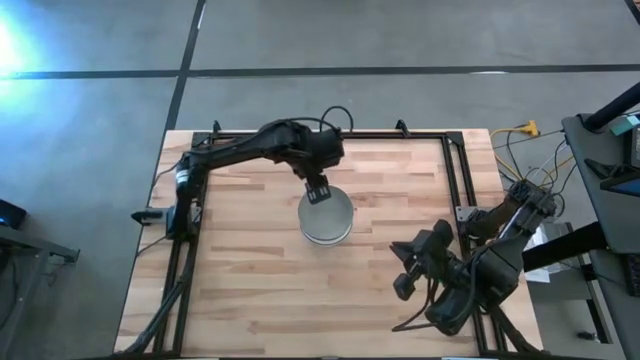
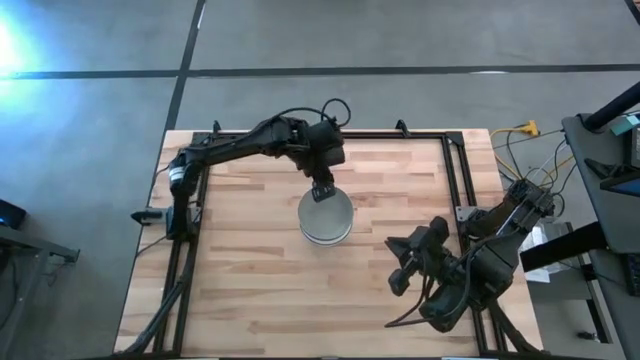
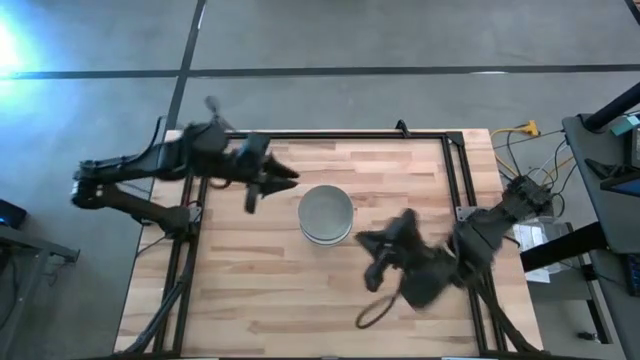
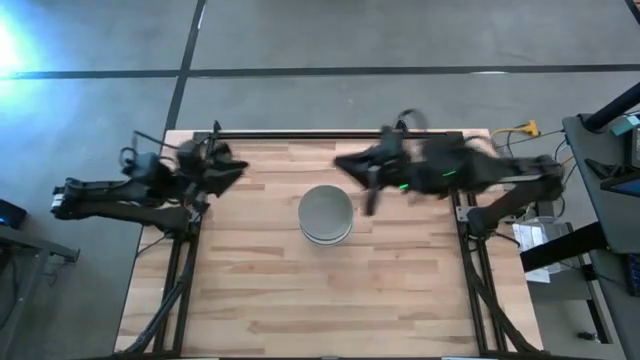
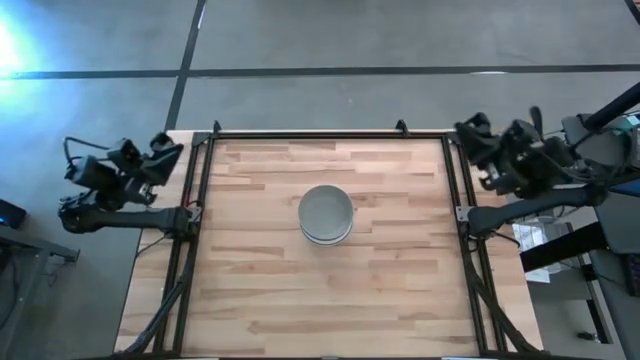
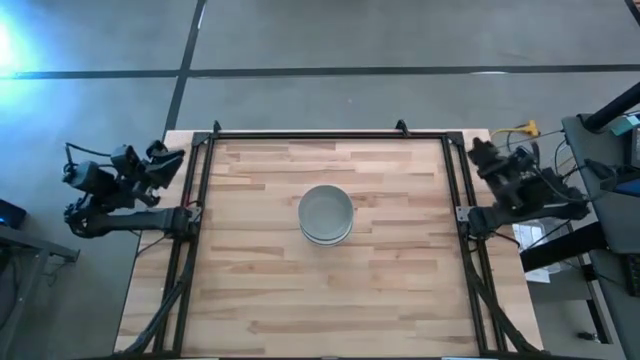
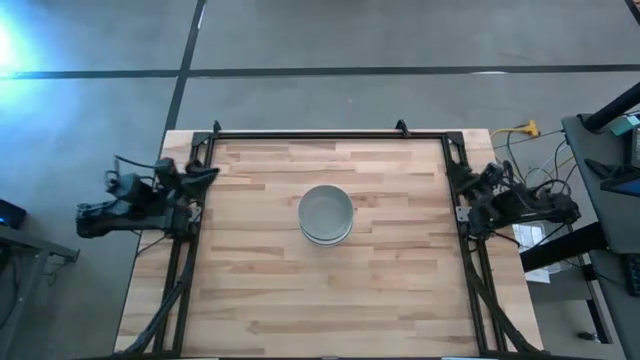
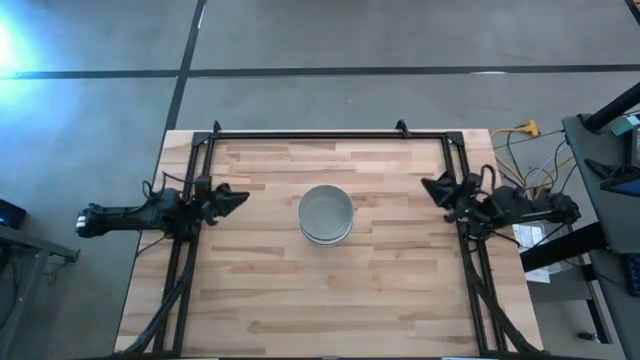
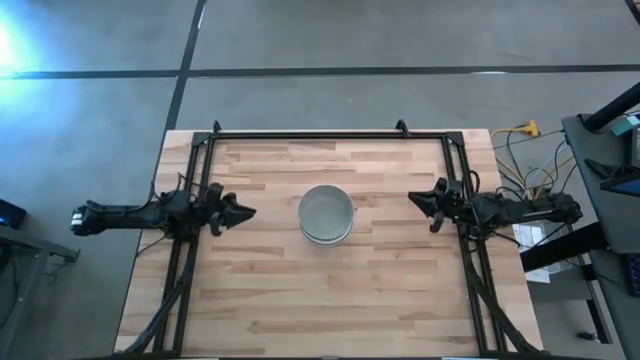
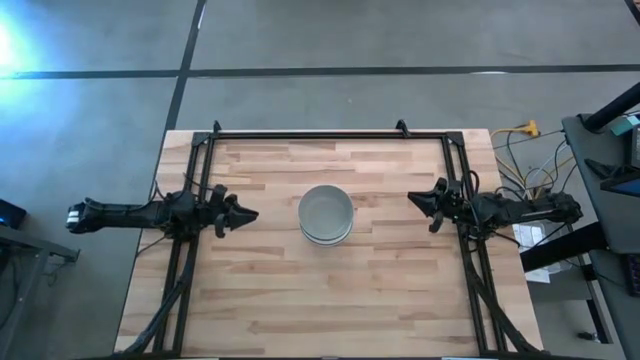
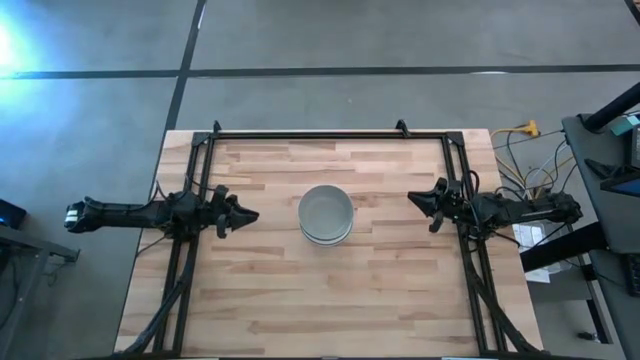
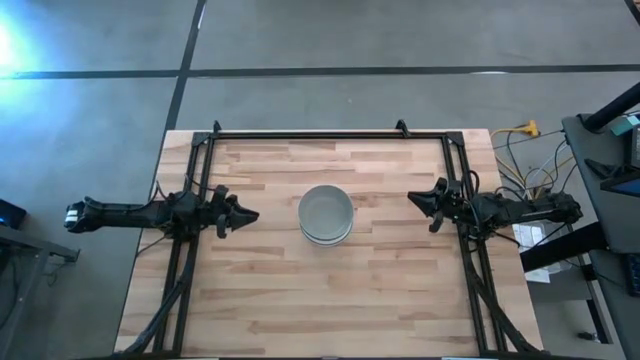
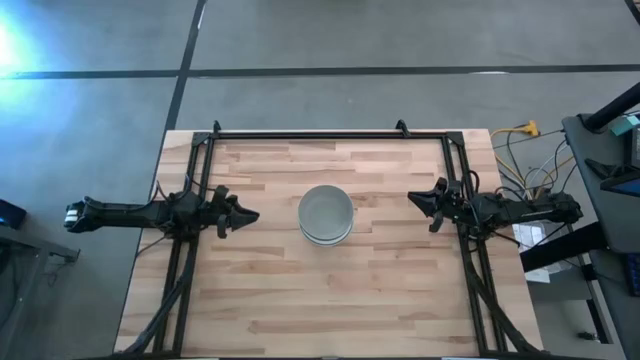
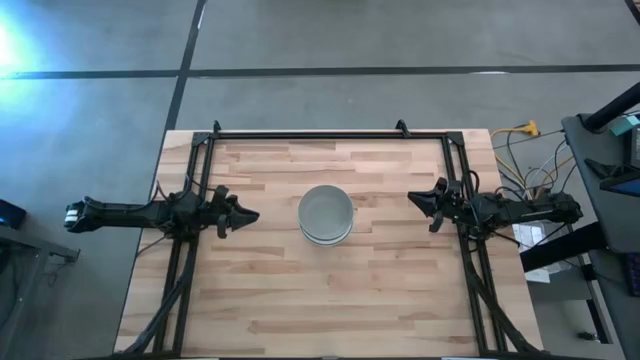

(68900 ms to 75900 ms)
Task: Nest bowls inside each other
Return to Home Position

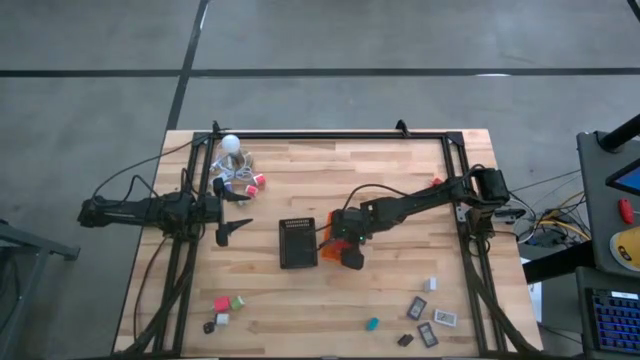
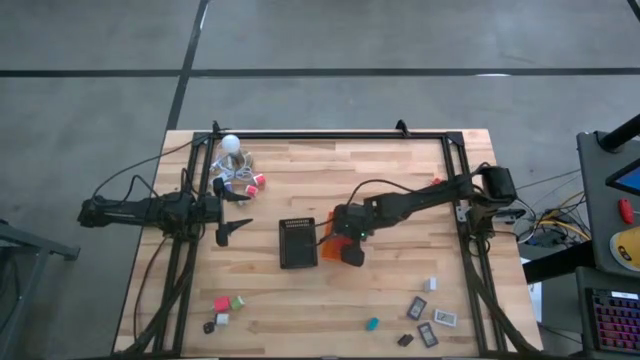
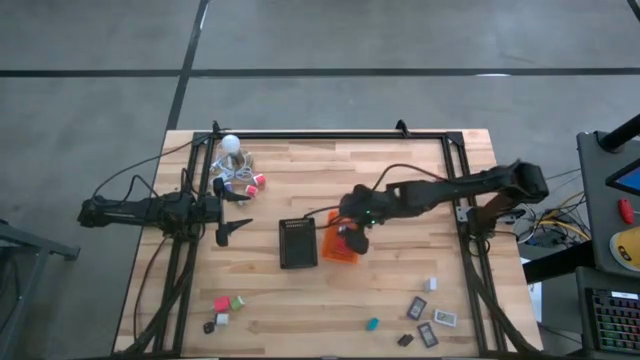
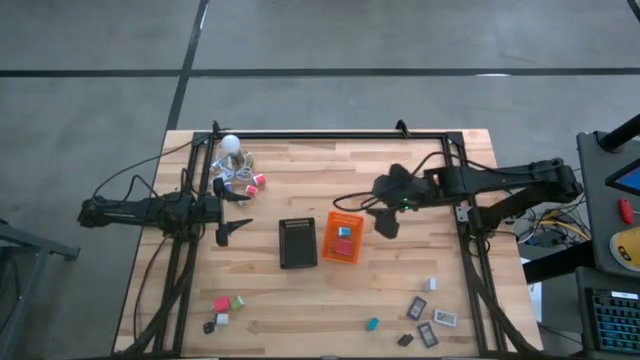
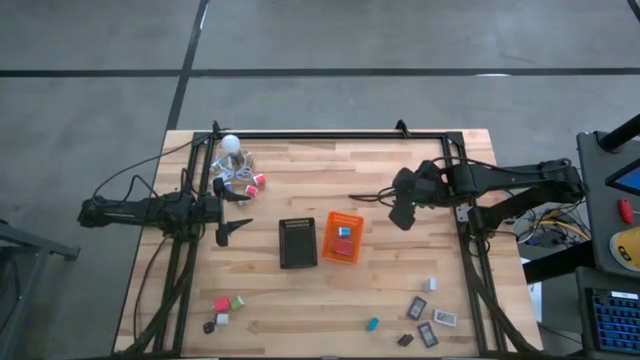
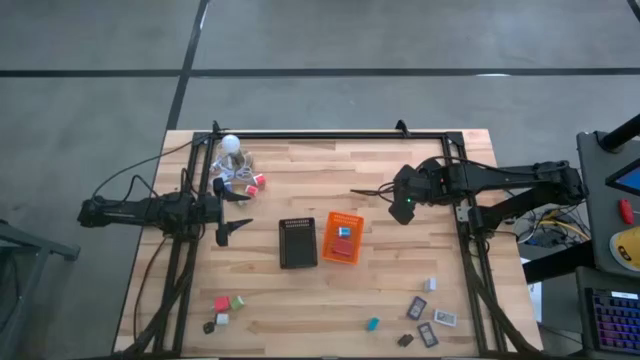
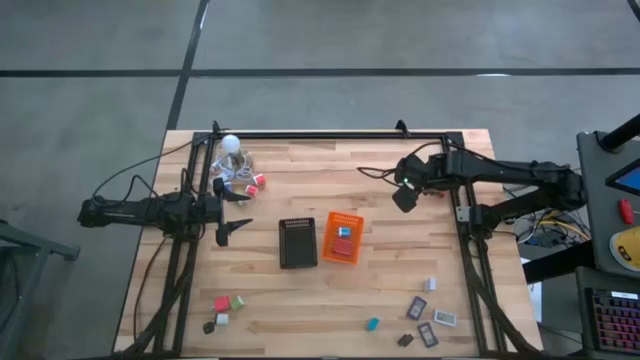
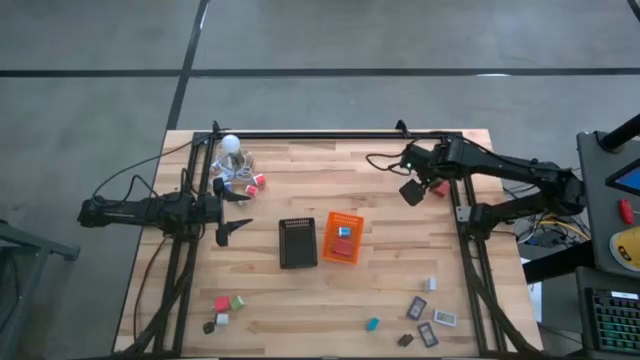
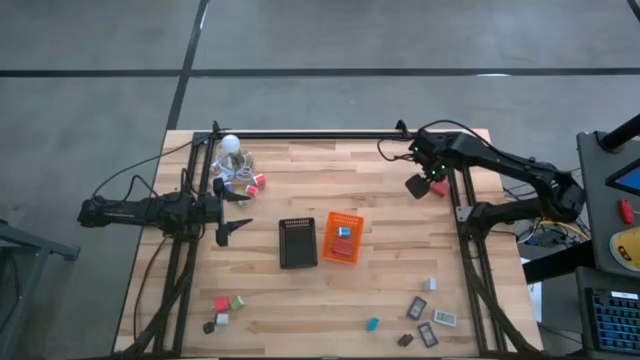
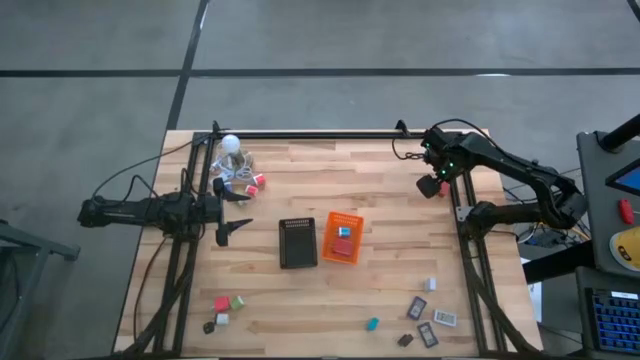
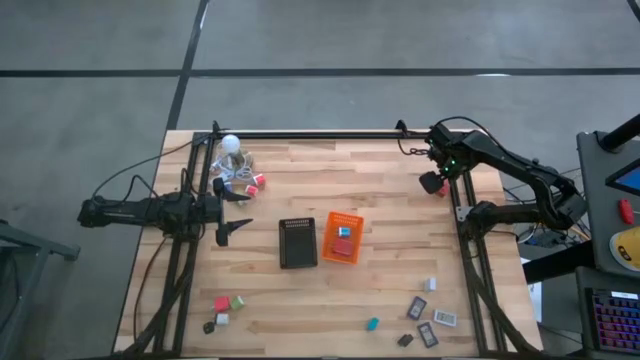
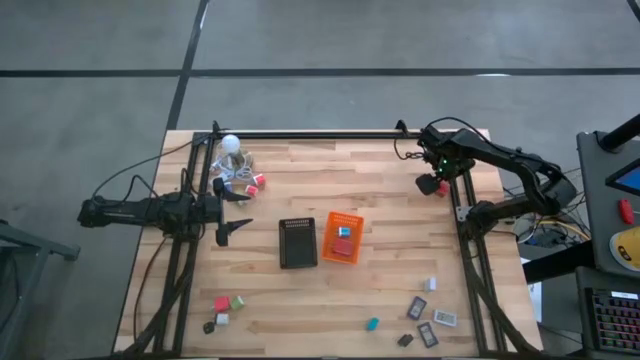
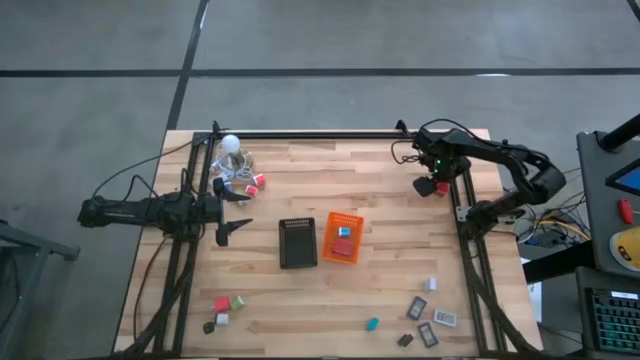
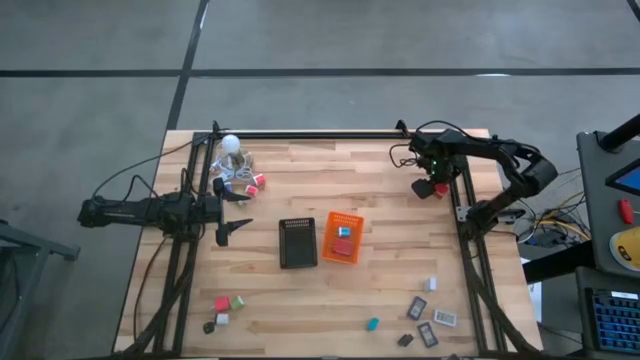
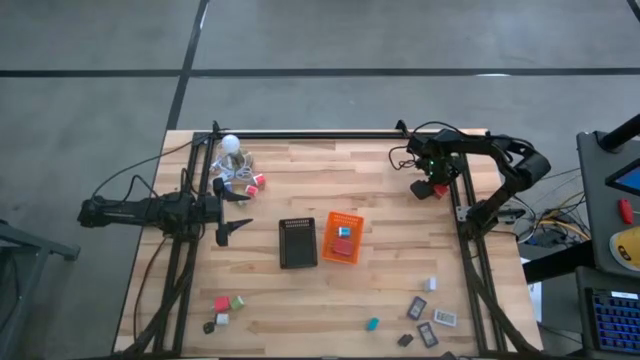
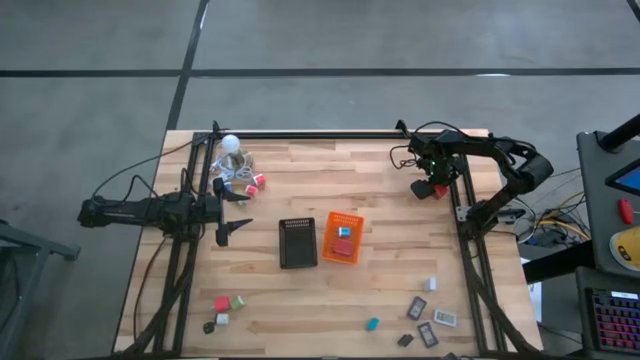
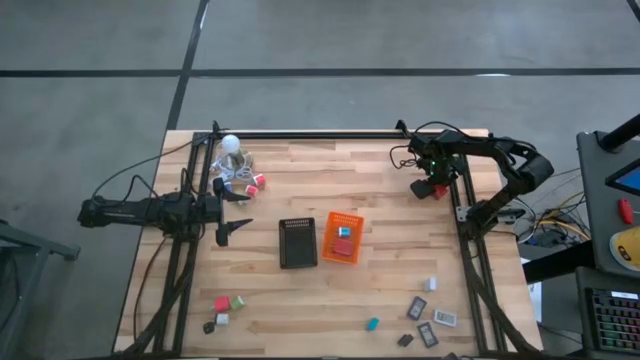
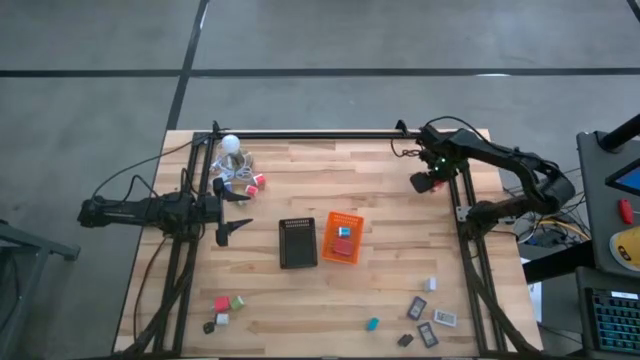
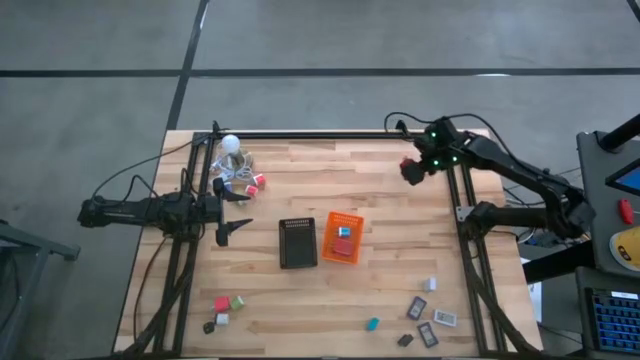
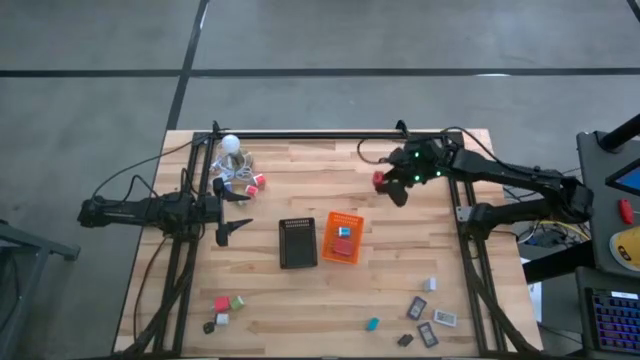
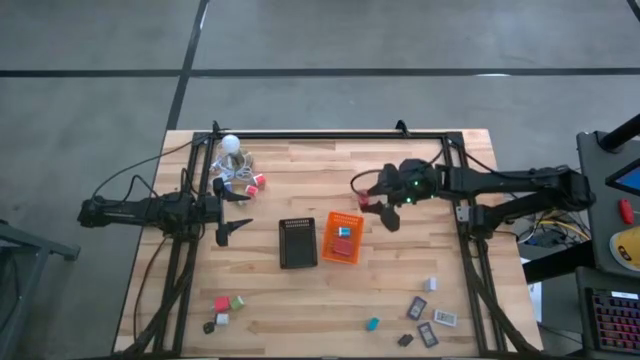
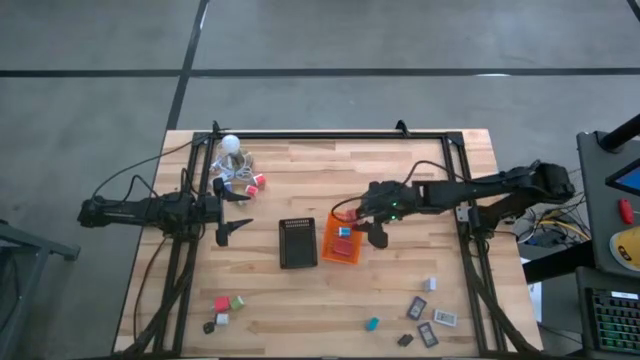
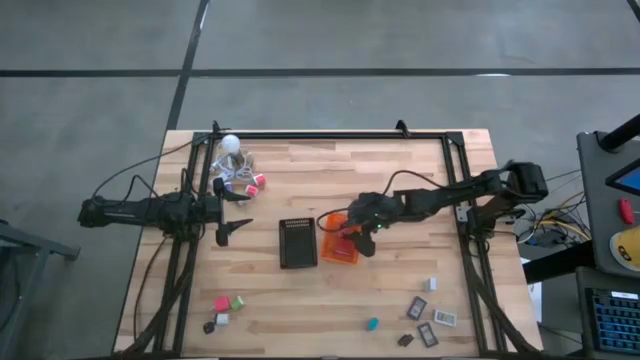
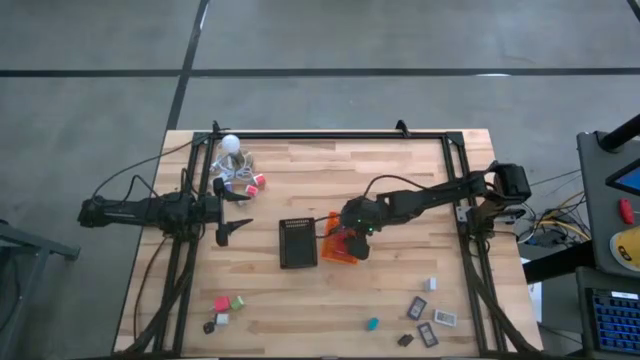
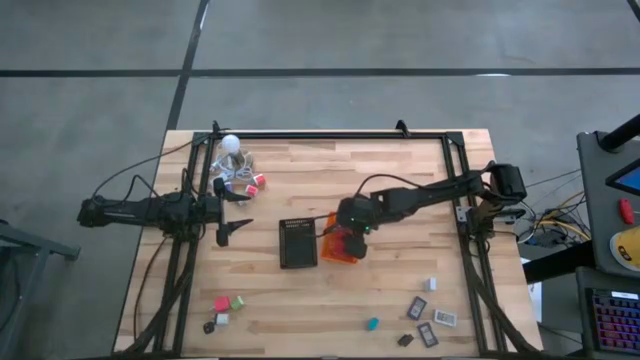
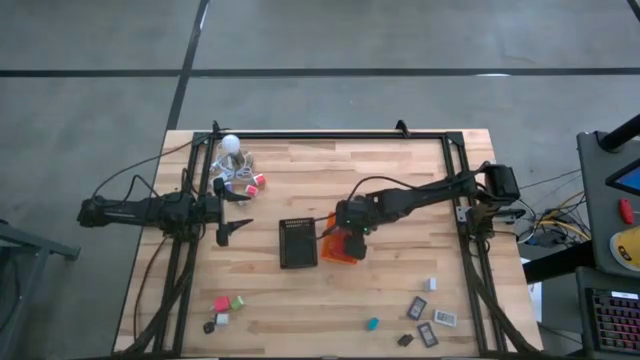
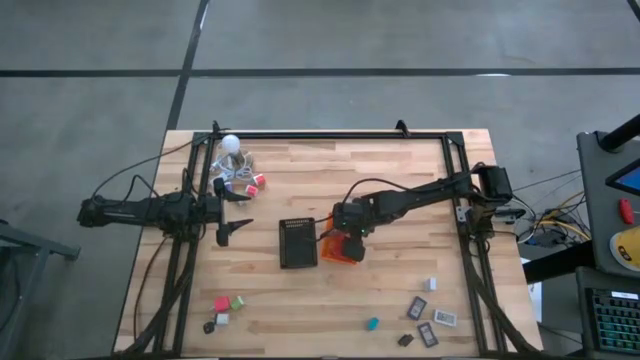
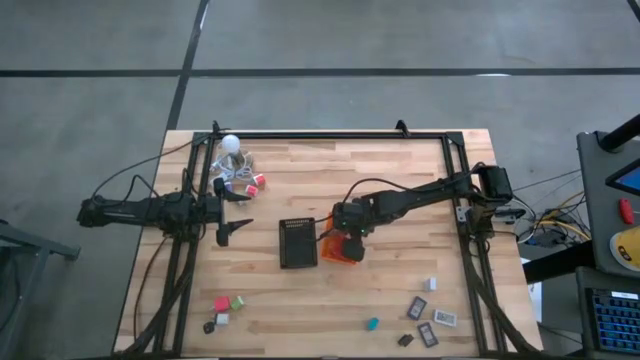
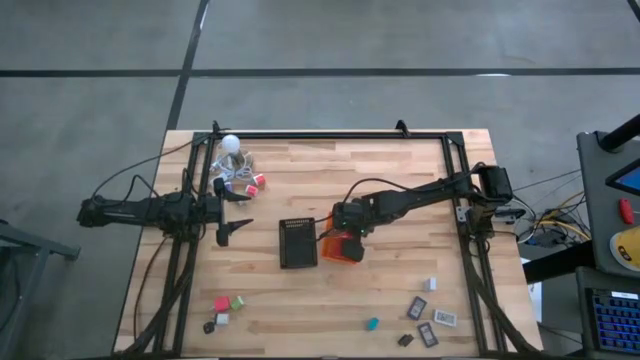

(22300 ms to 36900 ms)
Task: Pick & Place Office items
Put the red charger adapter into the orange bin
